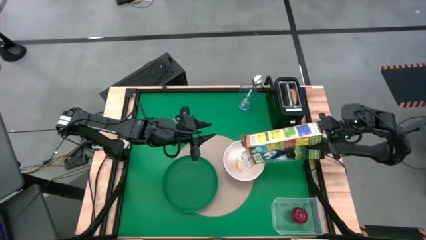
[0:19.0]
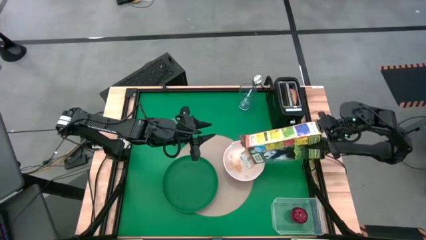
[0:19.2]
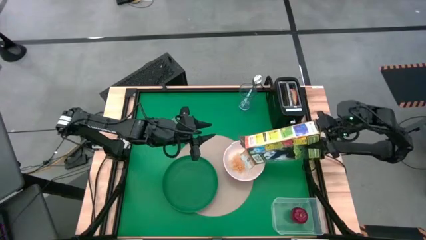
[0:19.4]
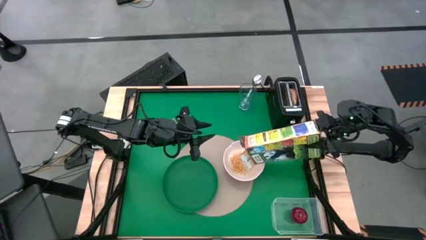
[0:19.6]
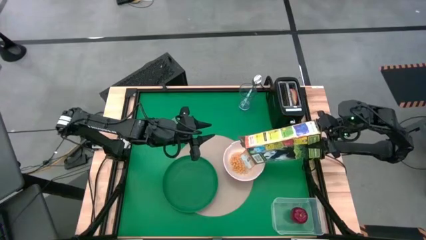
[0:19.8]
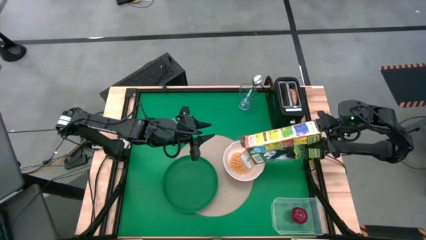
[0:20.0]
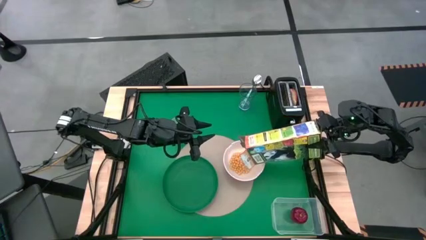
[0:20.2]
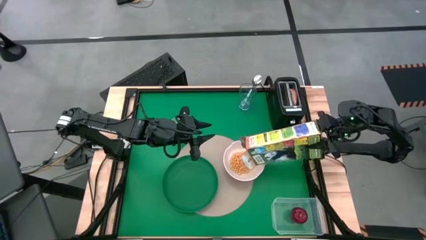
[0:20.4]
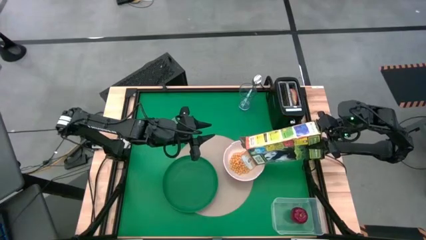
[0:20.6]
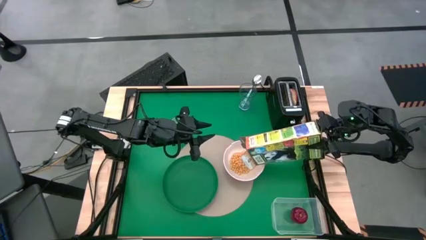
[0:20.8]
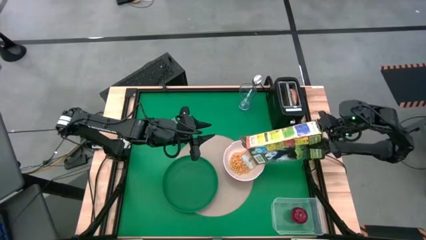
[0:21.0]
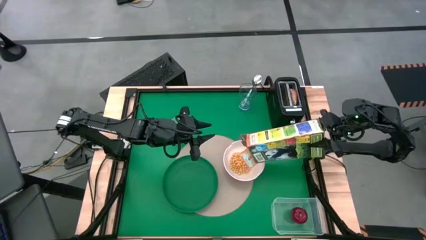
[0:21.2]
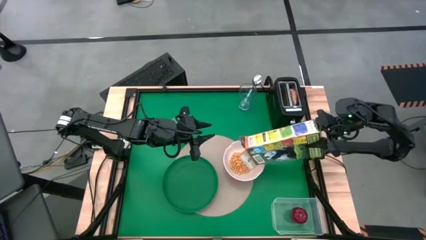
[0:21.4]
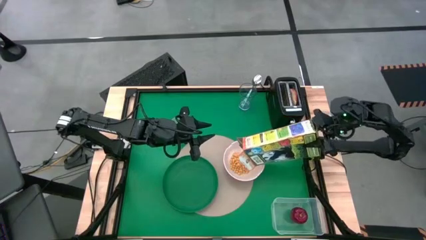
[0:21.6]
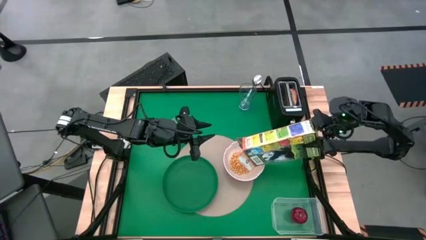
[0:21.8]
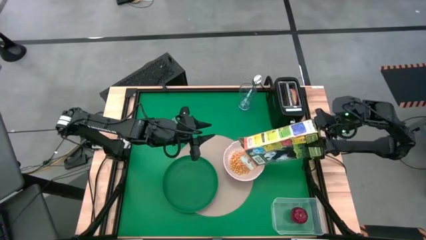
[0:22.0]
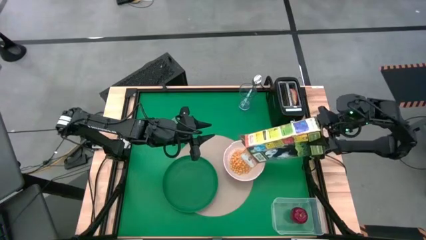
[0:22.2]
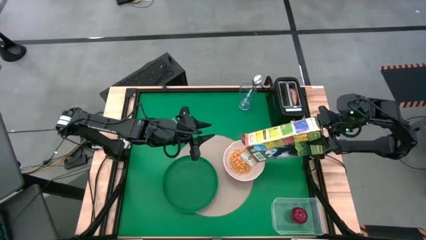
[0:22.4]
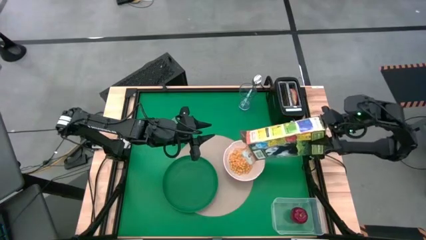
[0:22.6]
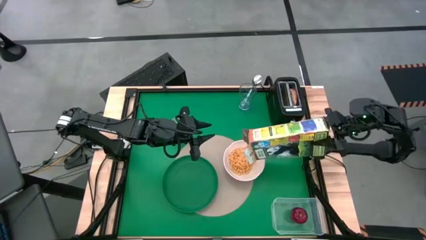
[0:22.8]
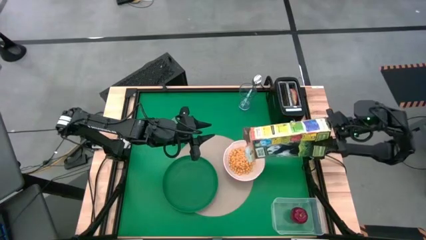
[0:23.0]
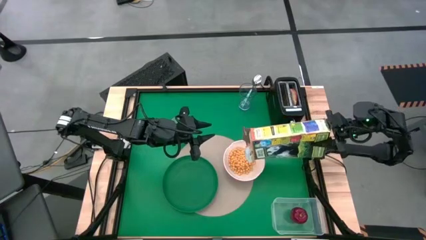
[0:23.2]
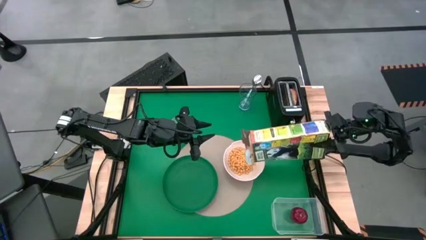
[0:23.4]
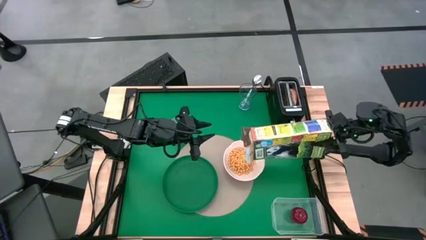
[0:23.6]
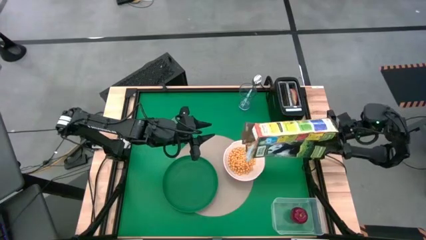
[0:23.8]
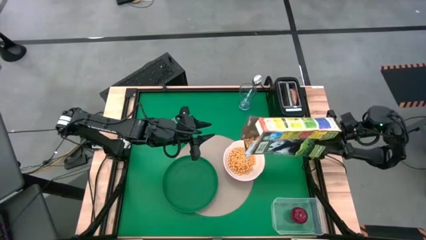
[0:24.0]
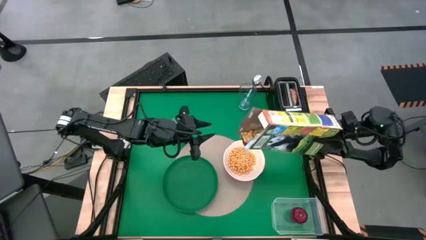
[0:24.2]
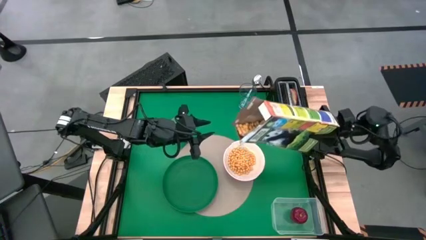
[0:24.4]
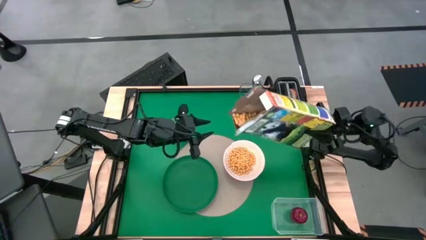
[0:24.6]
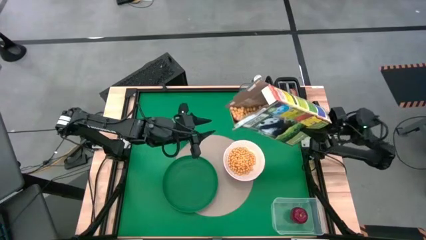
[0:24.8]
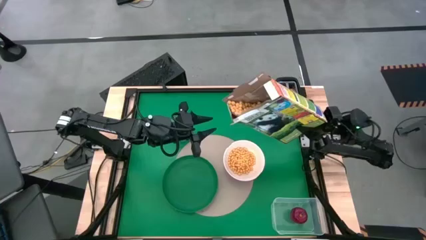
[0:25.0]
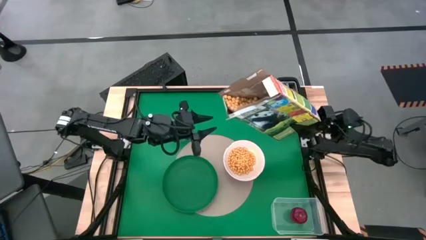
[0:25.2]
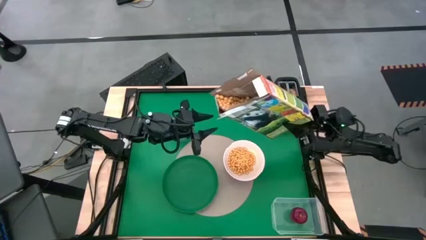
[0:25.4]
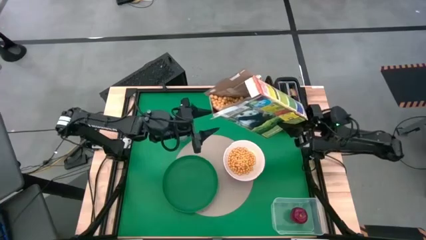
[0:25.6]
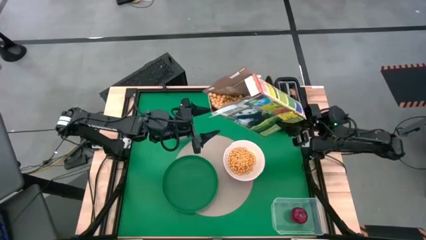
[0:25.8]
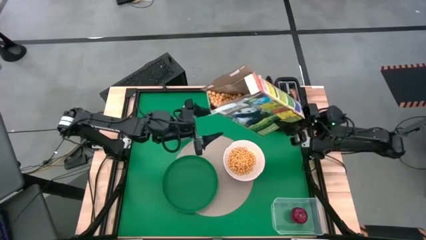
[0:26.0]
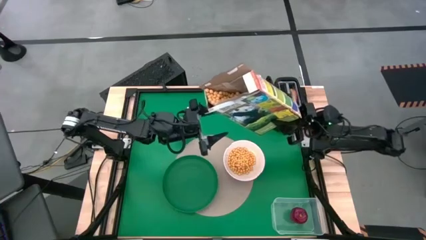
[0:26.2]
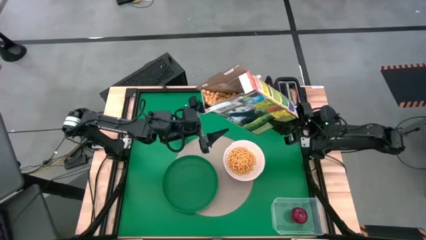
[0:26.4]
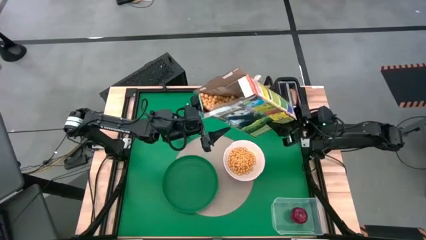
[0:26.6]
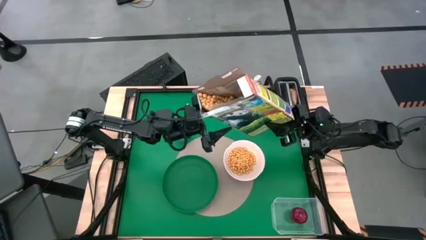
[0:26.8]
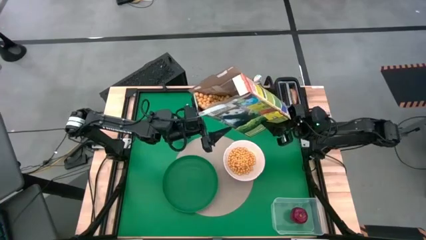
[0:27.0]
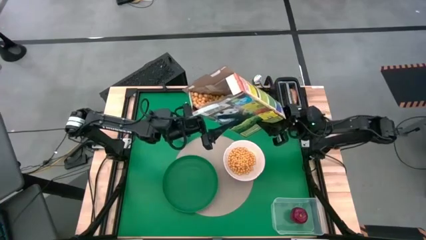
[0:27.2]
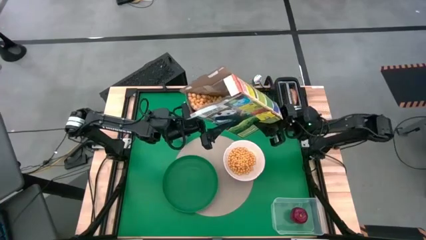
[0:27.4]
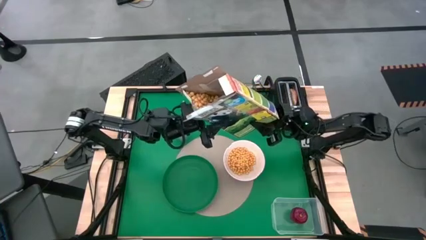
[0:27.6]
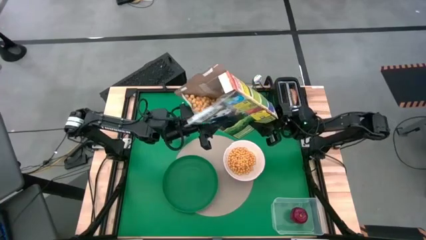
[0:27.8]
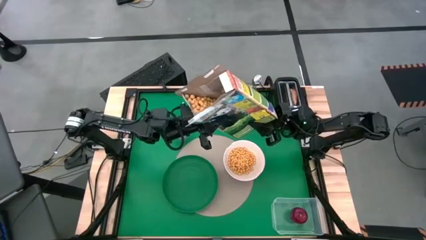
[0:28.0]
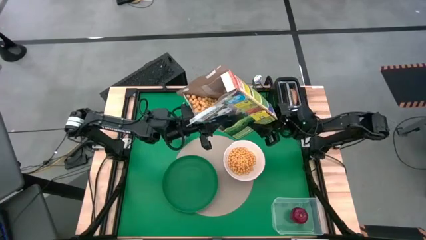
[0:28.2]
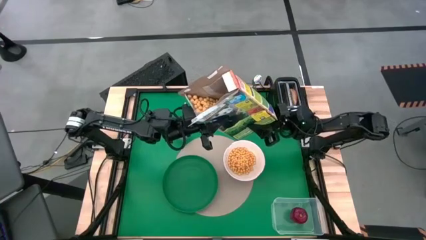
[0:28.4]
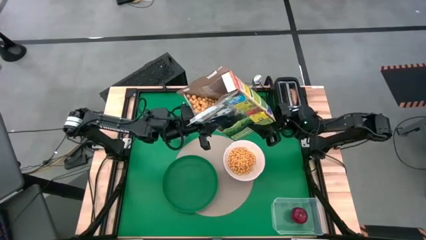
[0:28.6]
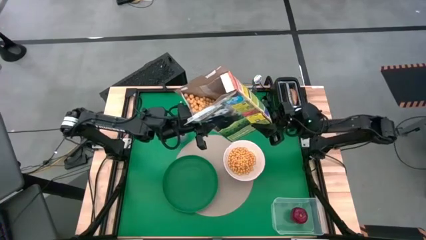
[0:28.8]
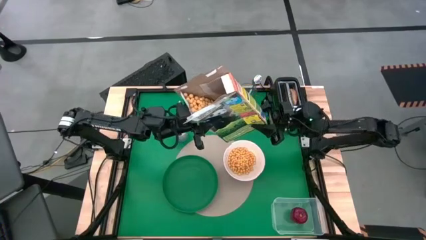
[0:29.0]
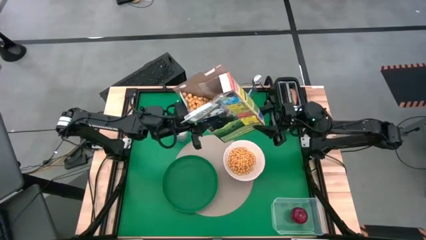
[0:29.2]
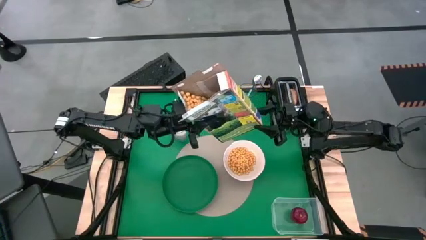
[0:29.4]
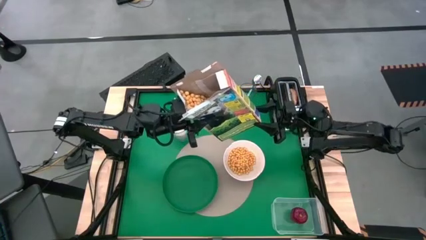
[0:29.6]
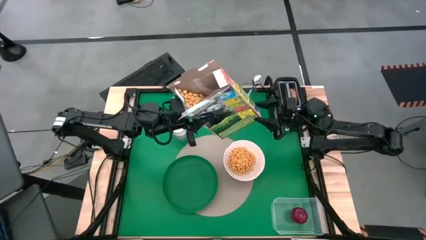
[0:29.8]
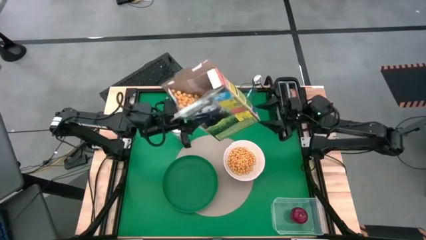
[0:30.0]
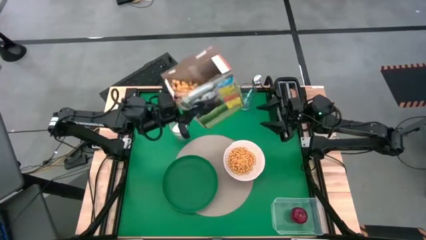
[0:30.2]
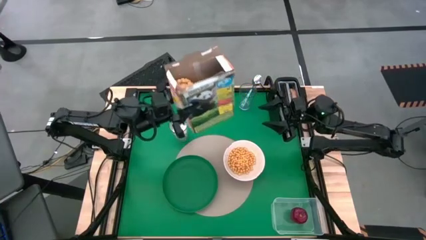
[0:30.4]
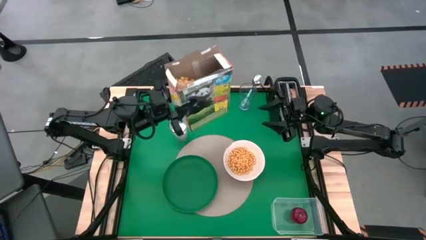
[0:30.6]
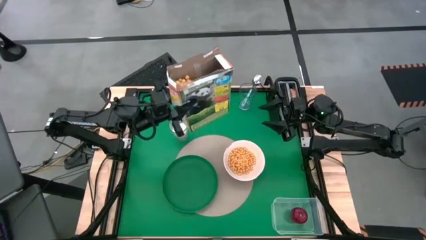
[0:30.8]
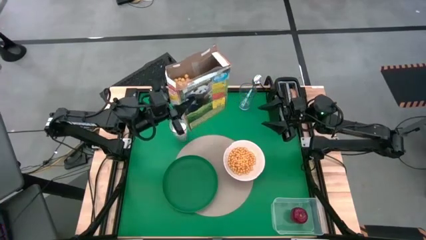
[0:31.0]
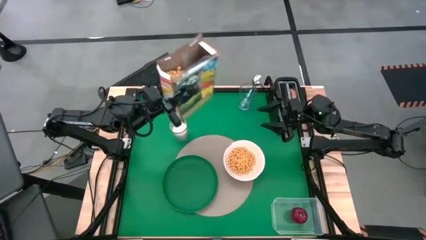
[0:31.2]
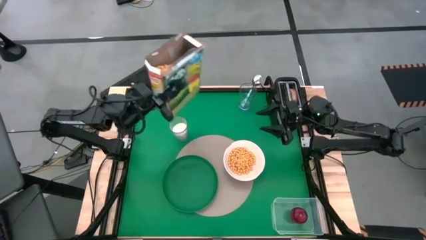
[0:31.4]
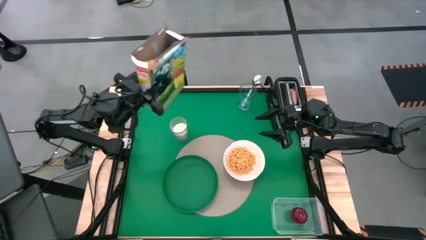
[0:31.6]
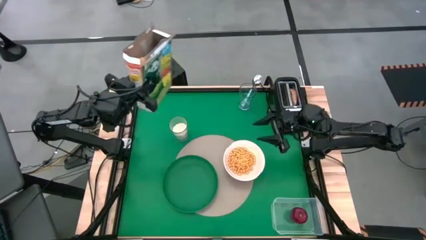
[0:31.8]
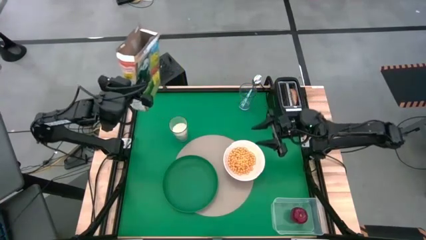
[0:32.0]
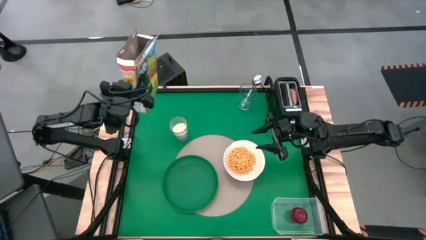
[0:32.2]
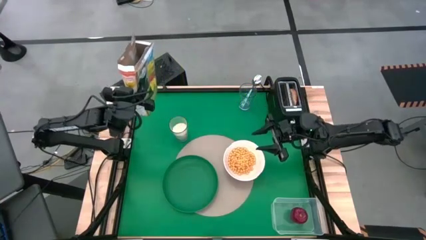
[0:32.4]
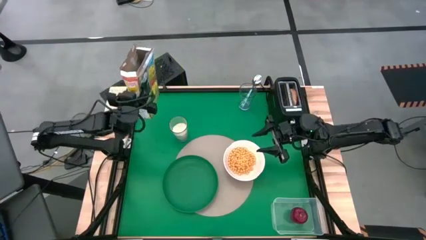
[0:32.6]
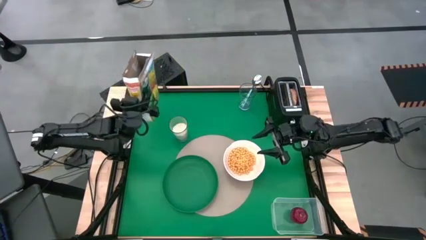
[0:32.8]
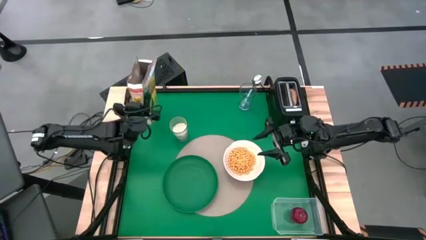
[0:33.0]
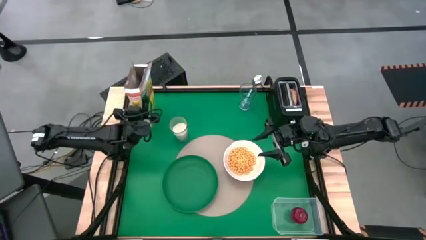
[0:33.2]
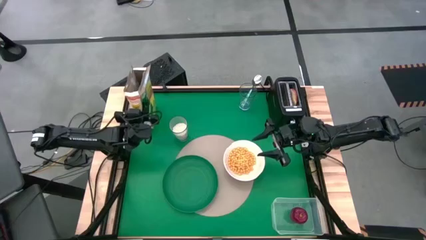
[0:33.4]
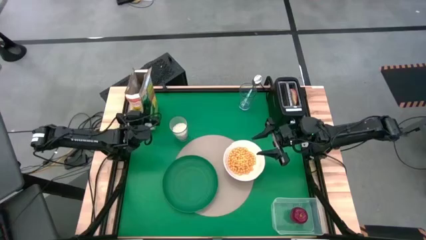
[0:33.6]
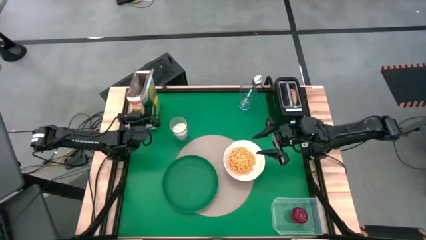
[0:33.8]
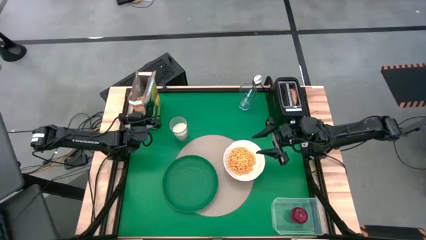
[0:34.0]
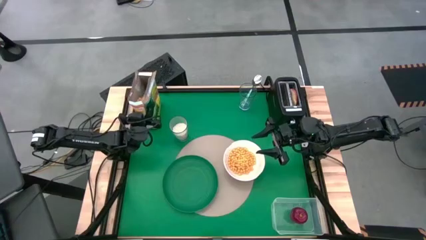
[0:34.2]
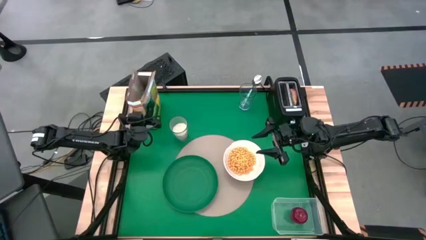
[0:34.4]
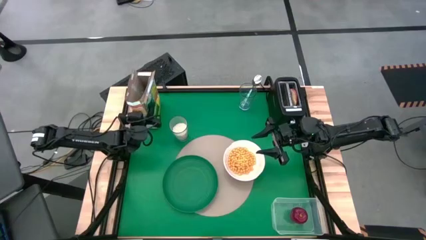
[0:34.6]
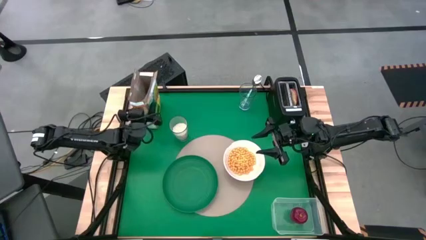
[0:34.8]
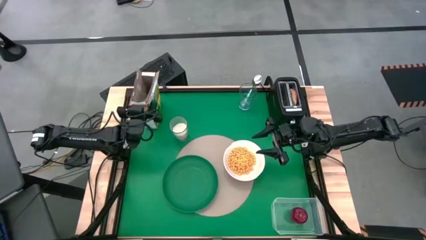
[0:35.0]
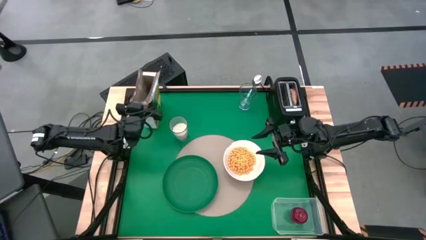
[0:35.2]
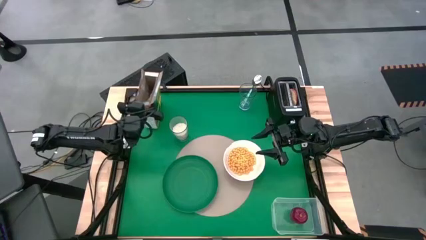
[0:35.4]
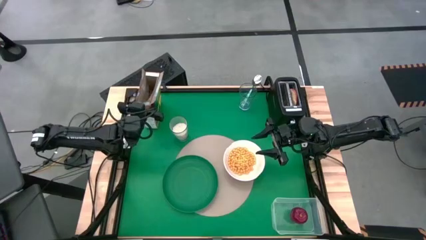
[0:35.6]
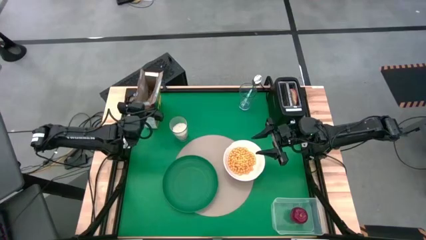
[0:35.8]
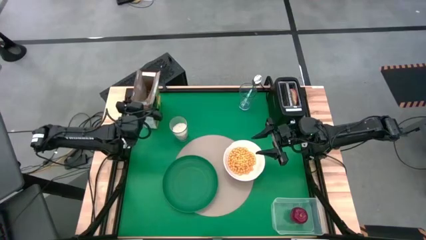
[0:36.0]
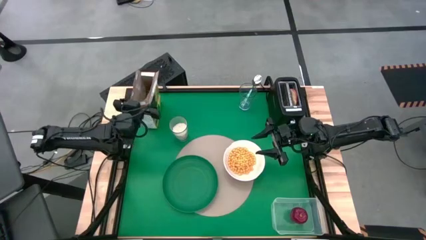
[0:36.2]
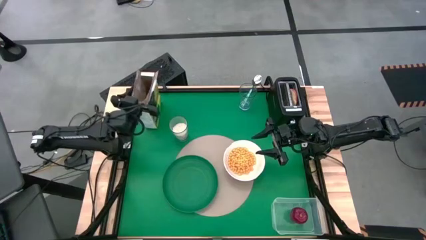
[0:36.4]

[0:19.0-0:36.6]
Task: Arrange a breakfast setting
Pour the cereal from the green cereal box into the white bowl
